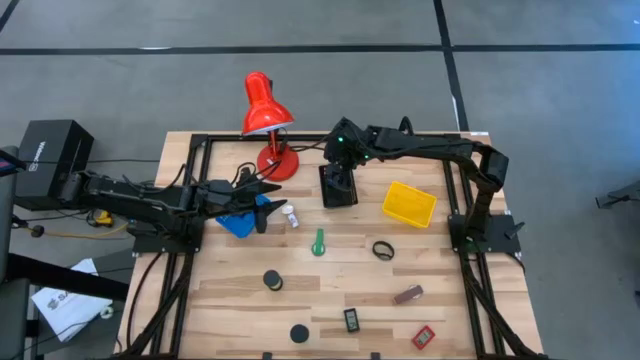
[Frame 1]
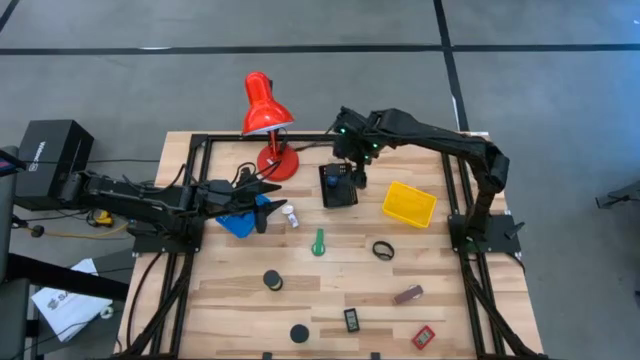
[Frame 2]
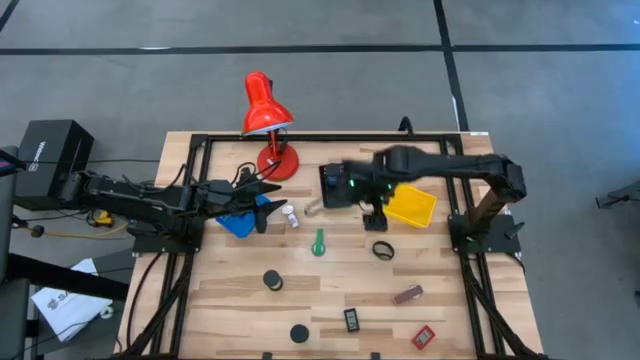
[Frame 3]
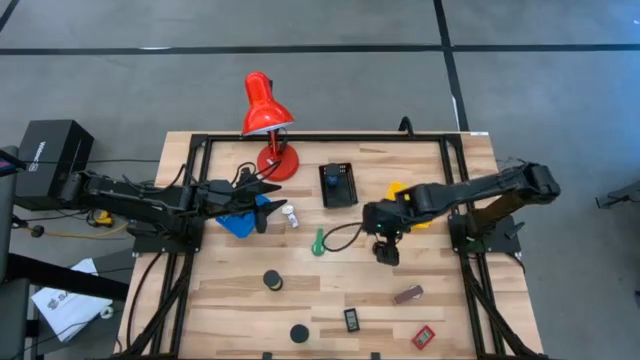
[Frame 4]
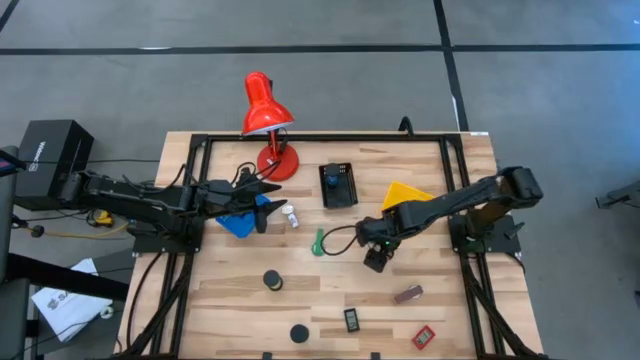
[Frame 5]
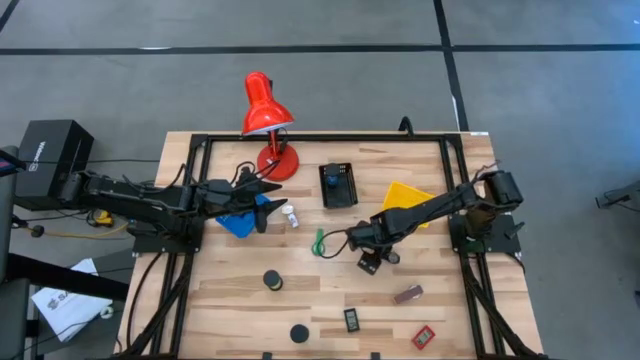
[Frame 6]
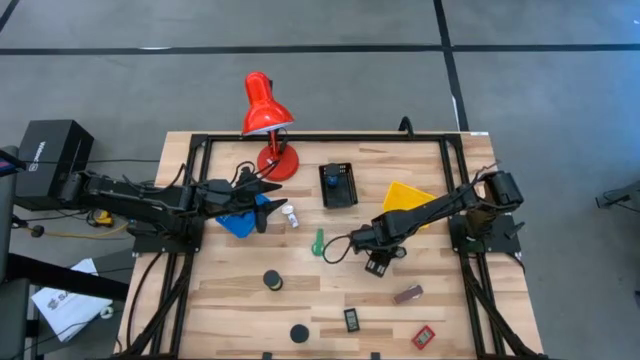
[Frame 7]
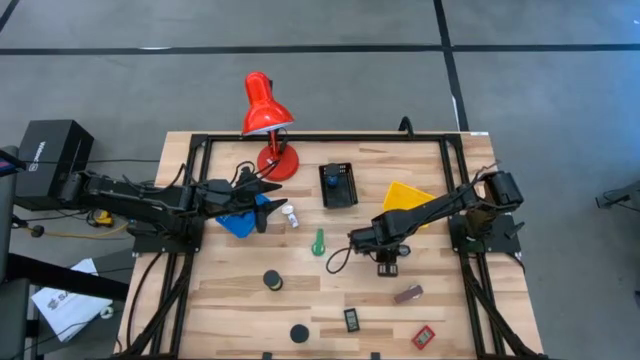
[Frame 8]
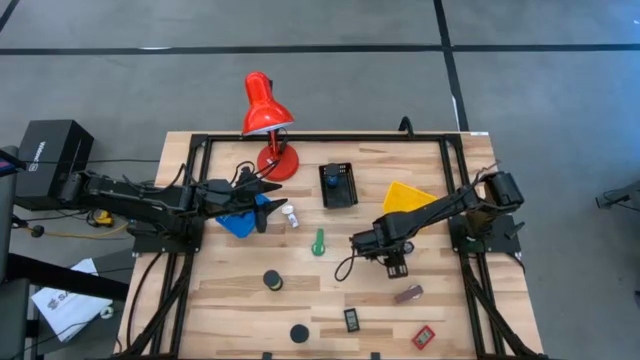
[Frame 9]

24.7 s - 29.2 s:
Task: Pick & Place Office items
Put the black watch into the yellow basket

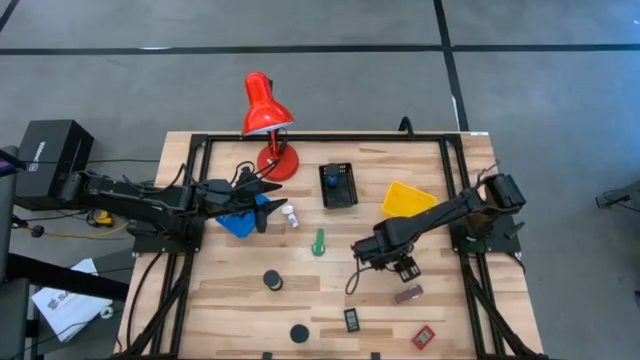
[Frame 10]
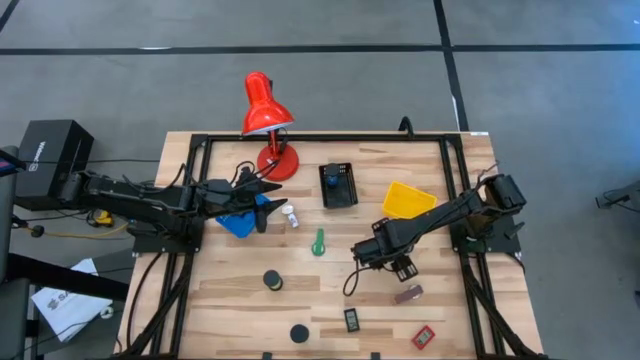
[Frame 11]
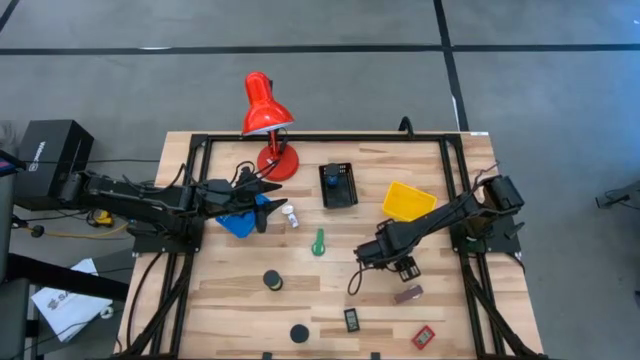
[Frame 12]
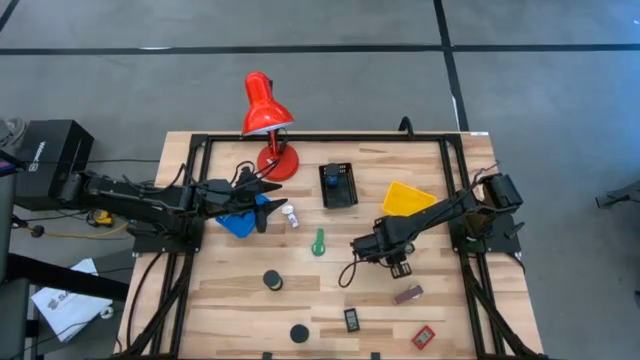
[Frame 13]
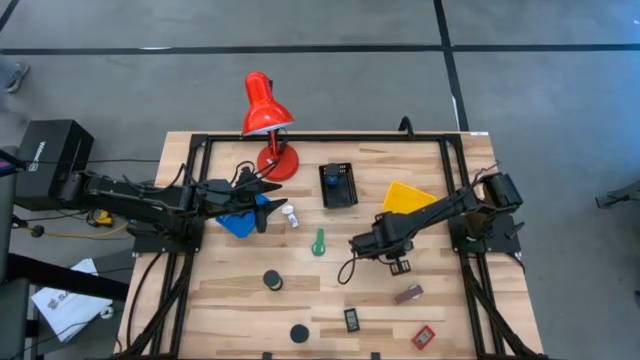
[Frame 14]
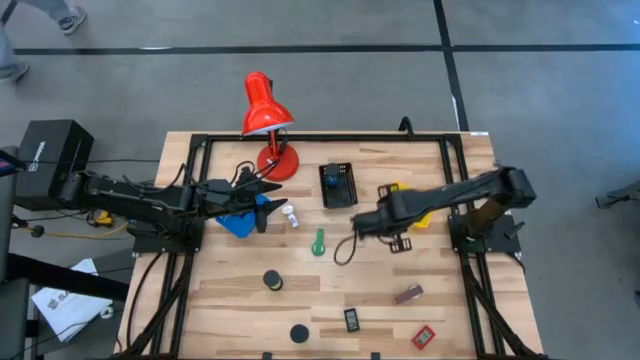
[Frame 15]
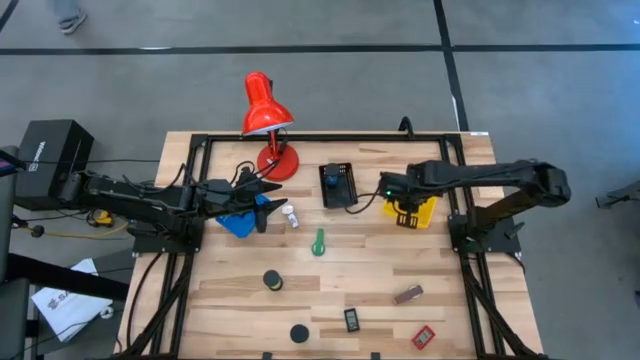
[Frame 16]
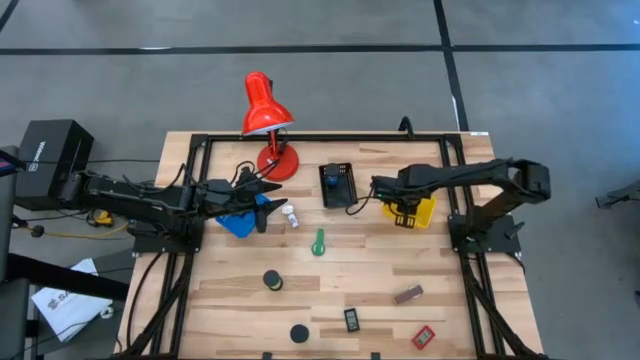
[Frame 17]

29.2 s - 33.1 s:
Put the black watch into the yellow basket

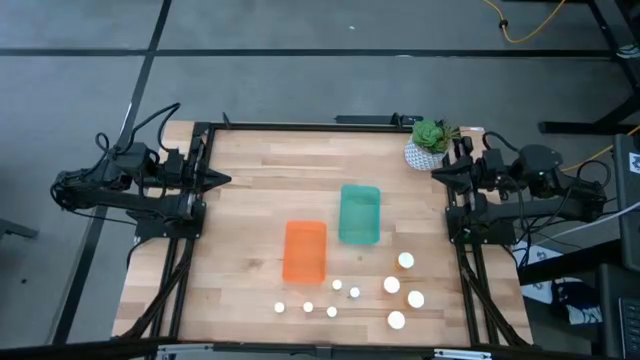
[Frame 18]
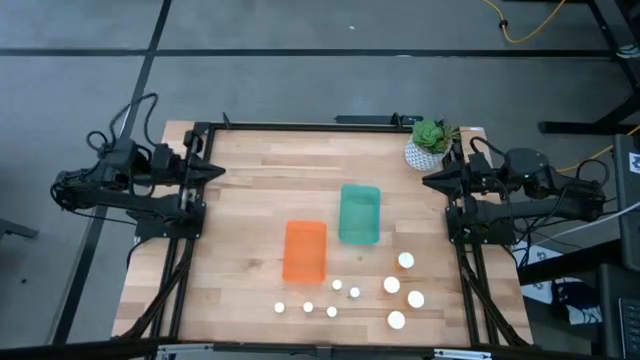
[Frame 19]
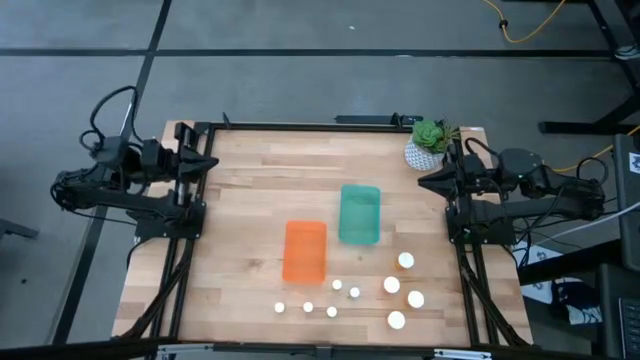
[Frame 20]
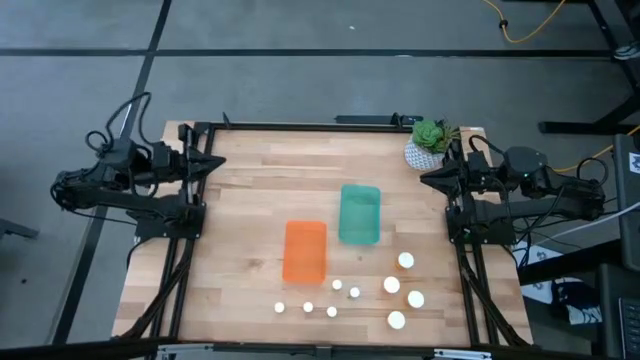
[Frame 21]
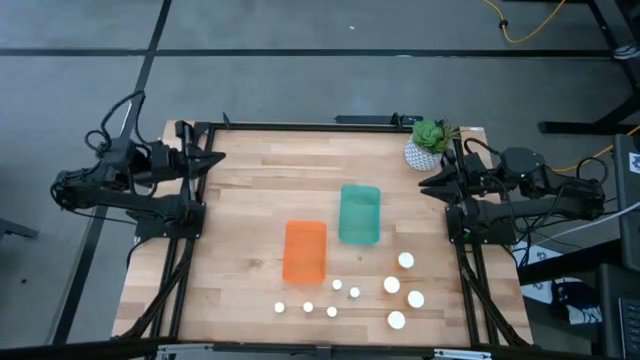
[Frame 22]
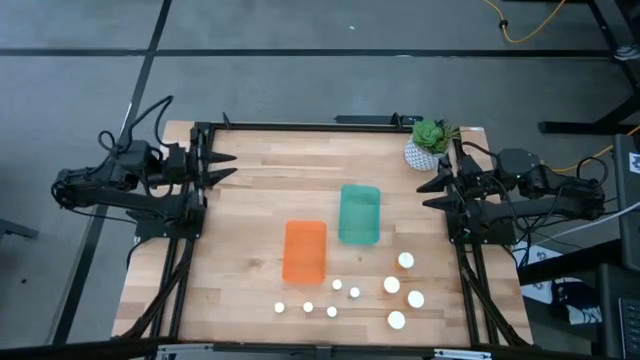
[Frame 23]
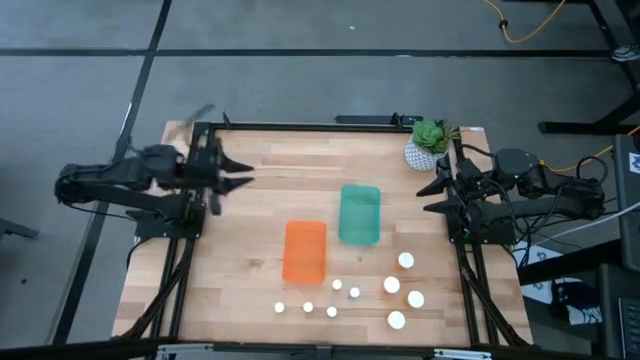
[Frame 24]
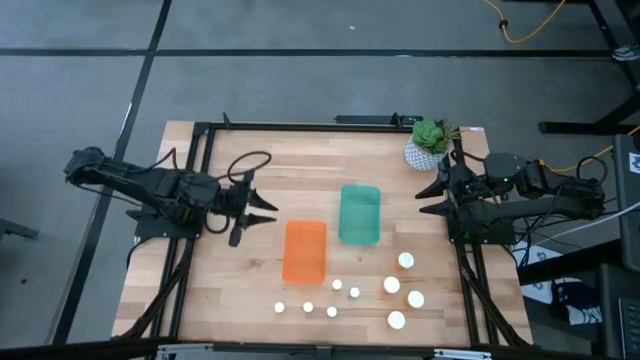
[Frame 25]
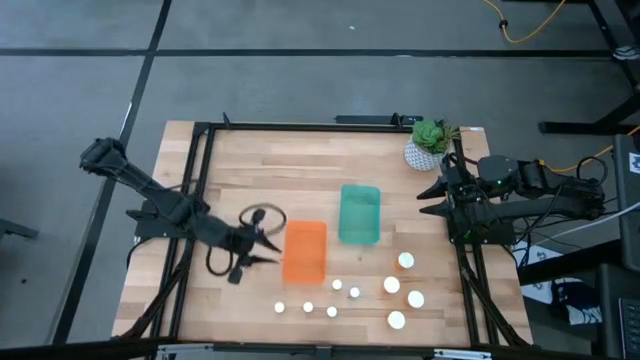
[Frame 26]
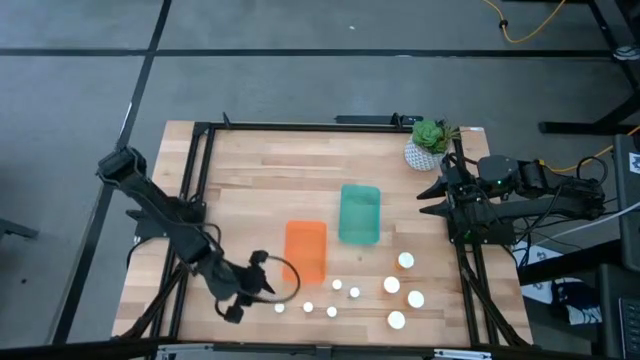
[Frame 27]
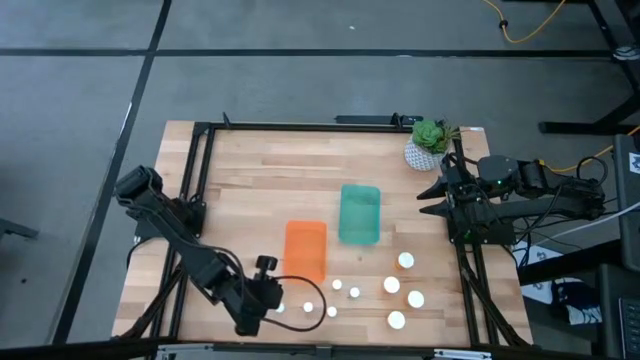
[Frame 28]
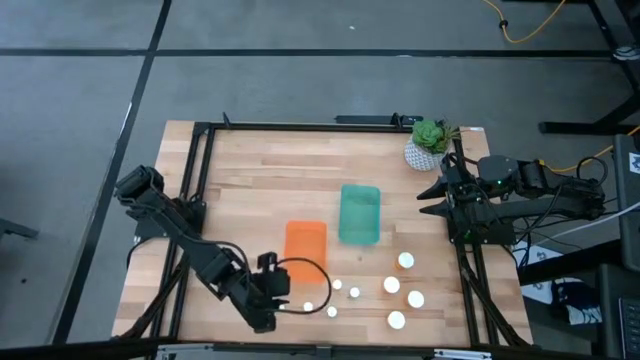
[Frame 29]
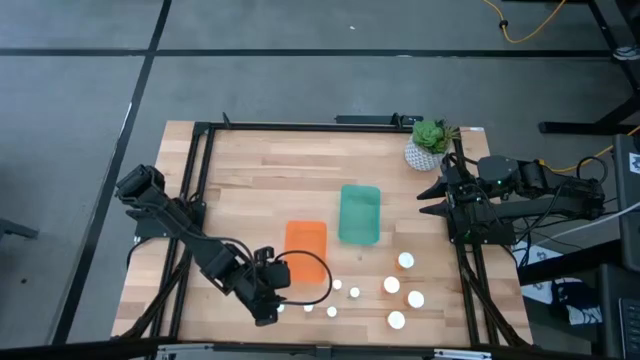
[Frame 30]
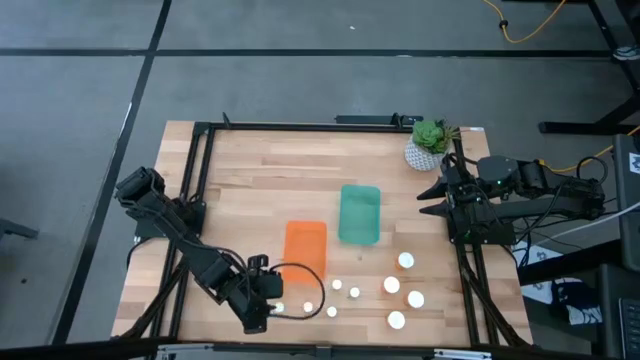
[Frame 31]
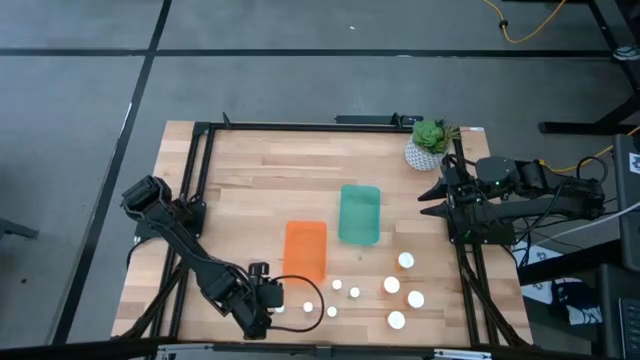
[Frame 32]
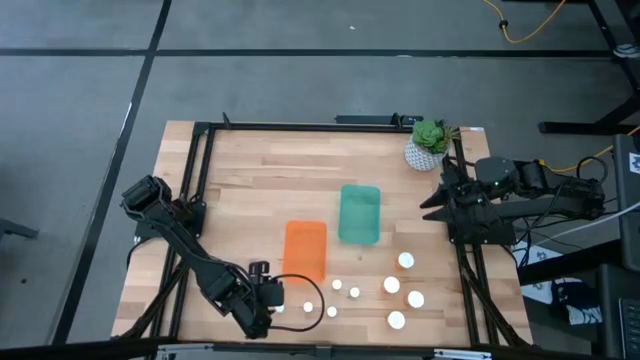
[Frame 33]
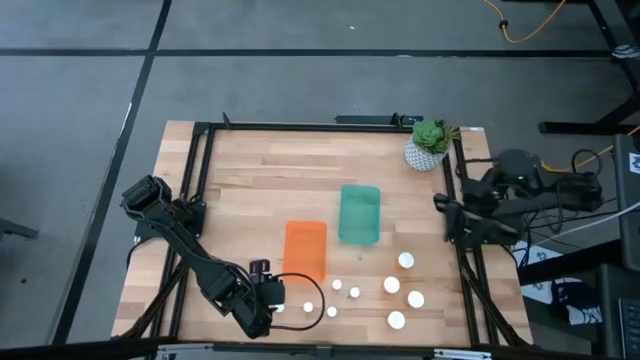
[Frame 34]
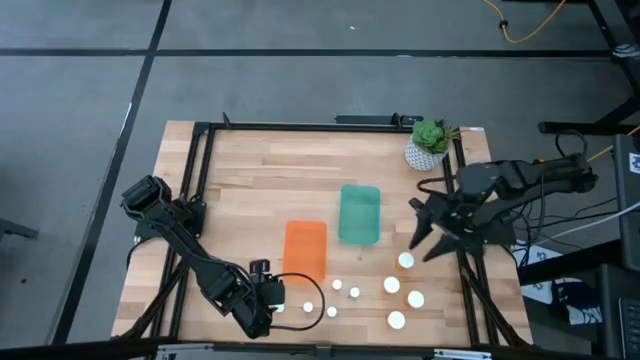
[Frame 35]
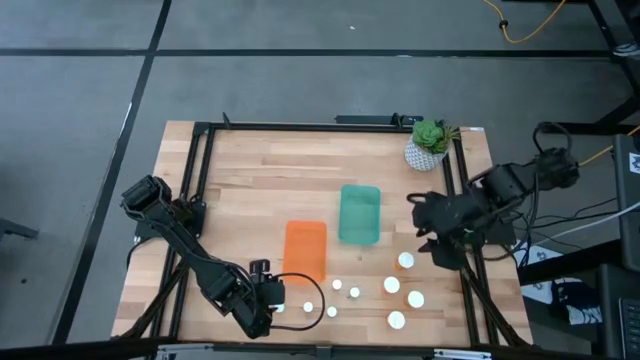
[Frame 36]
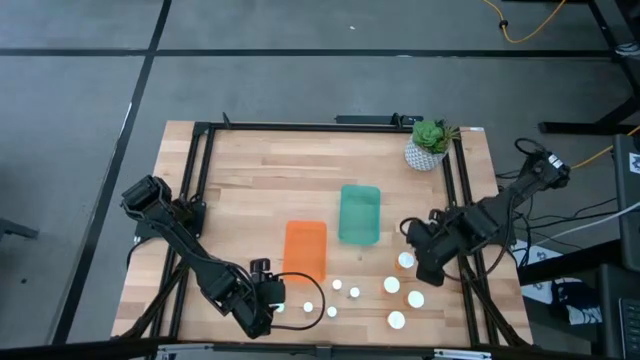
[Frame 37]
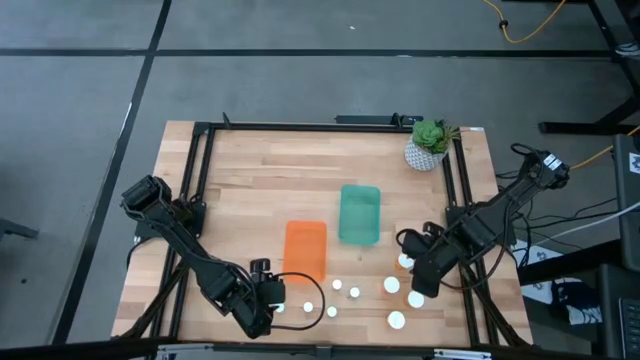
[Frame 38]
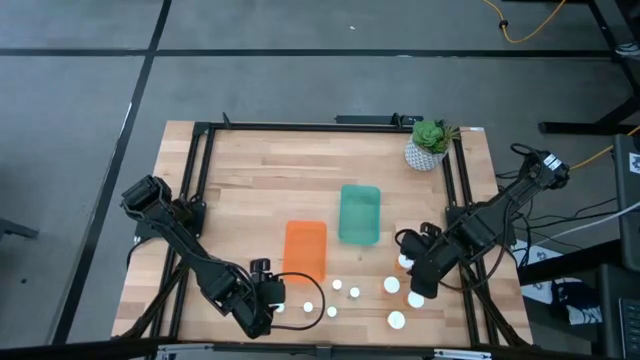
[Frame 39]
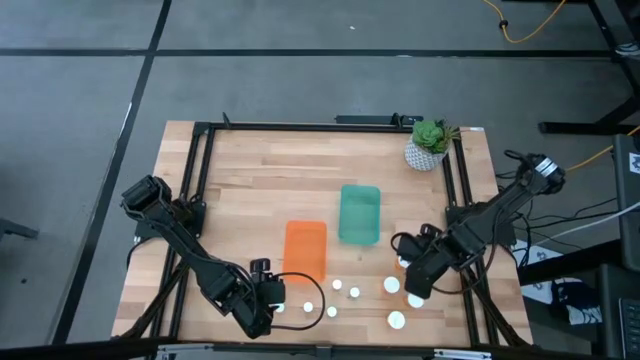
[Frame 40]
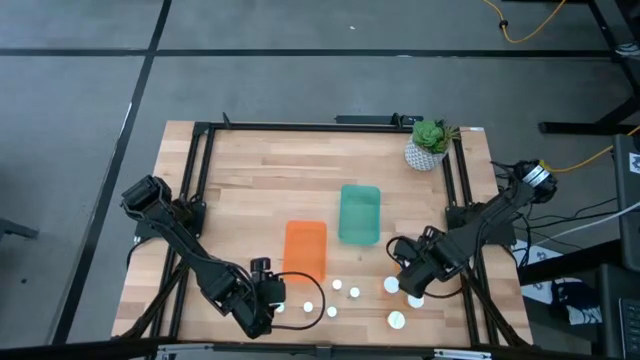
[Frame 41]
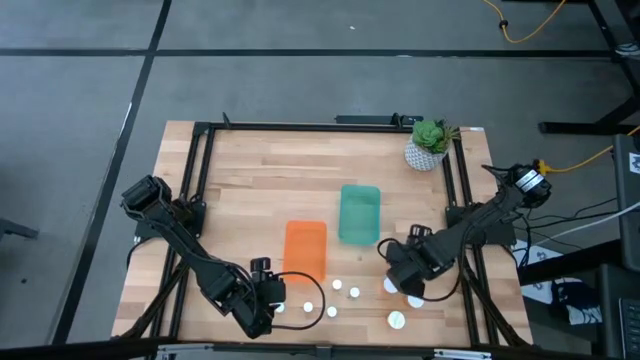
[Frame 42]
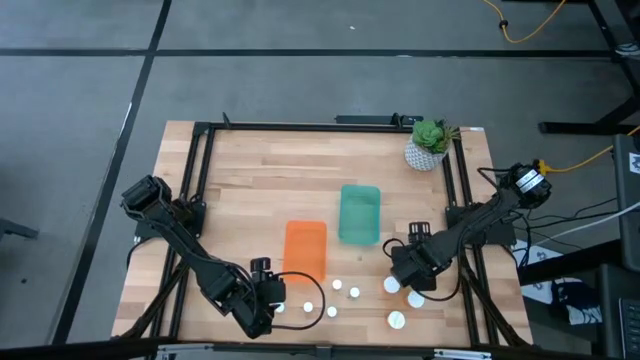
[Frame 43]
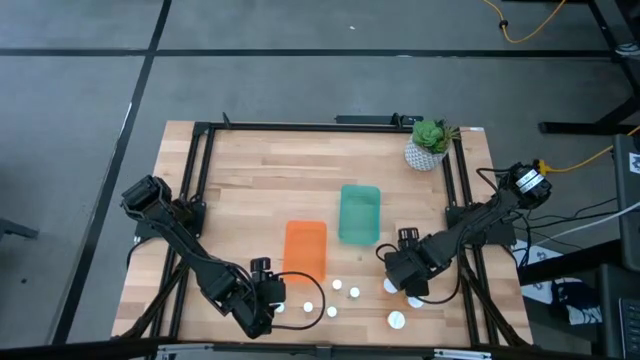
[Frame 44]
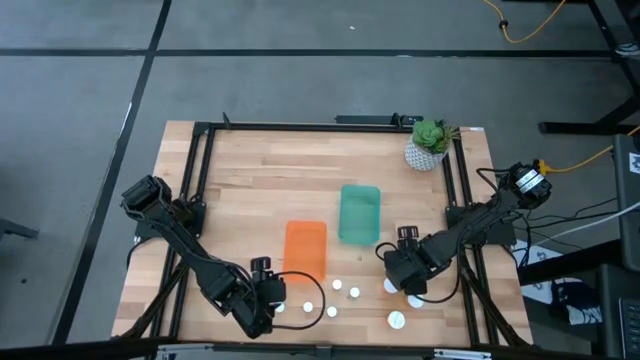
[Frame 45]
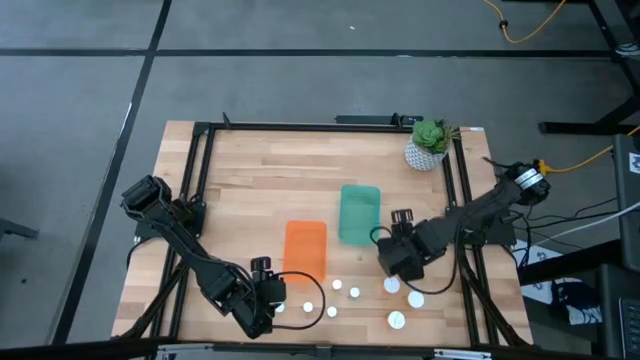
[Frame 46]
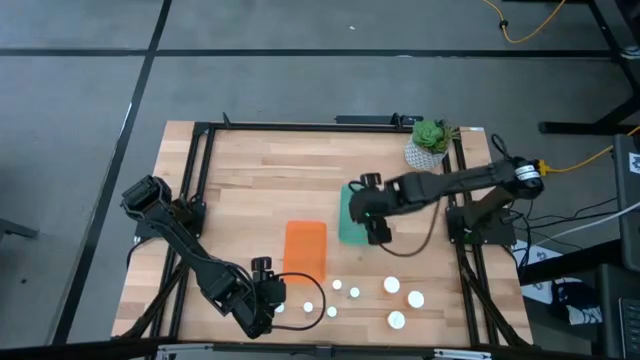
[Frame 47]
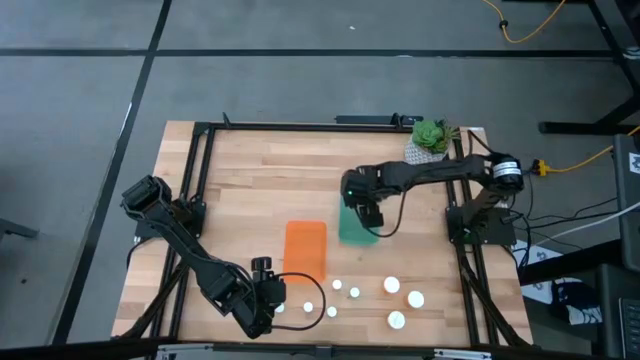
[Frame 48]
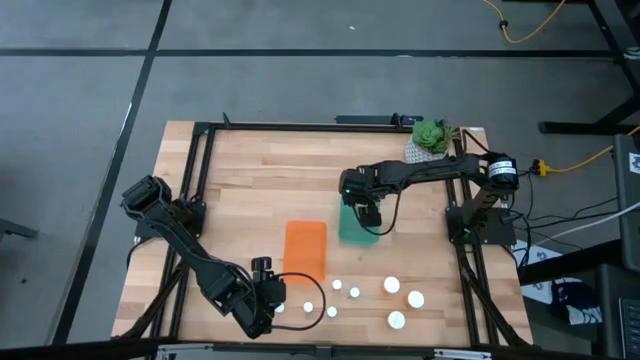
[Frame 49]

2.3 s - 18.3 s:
Task: Pick and place medicine bottles into bin by pill shape (circle, oval)
Put the big orange capsule bottle into the green bin
